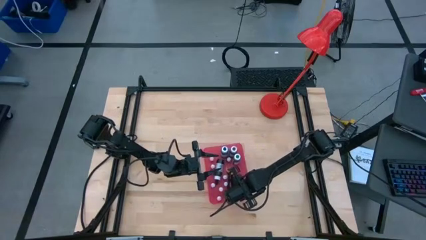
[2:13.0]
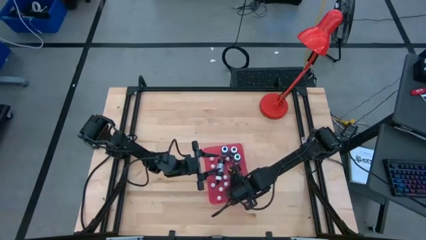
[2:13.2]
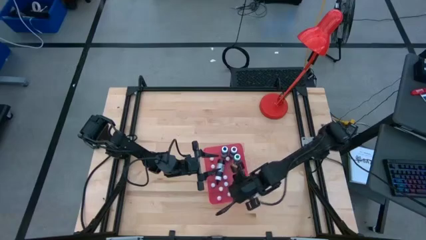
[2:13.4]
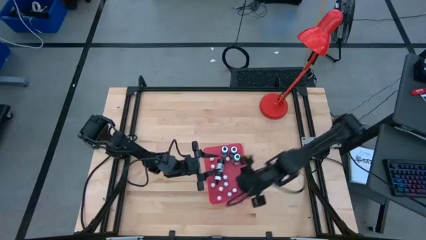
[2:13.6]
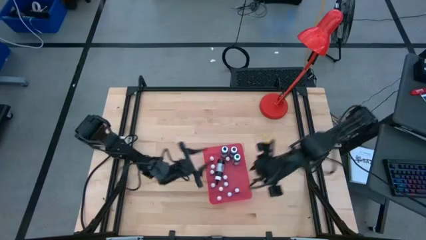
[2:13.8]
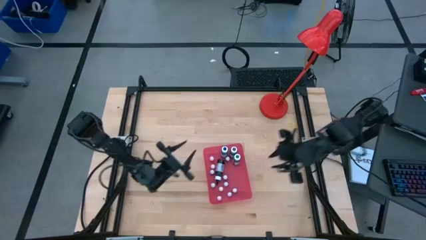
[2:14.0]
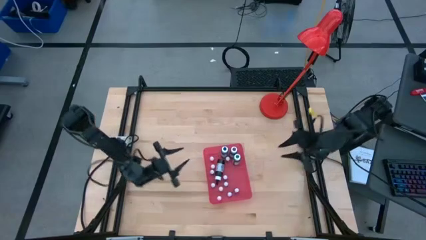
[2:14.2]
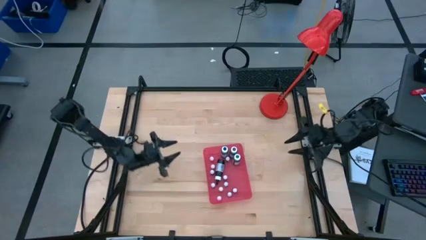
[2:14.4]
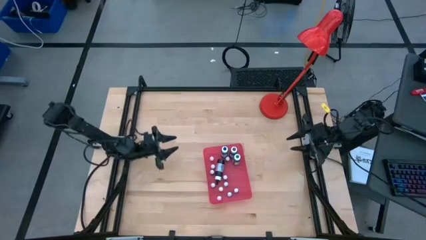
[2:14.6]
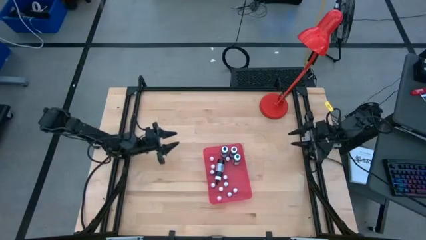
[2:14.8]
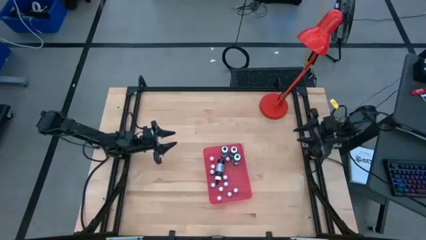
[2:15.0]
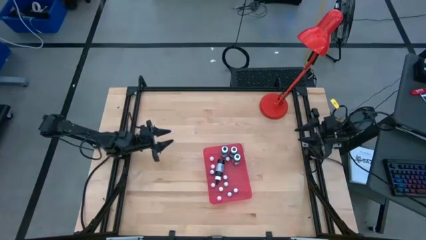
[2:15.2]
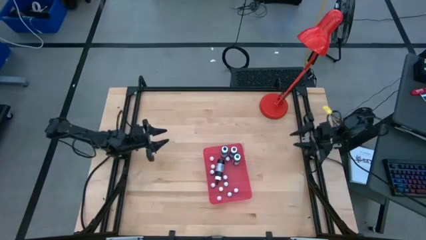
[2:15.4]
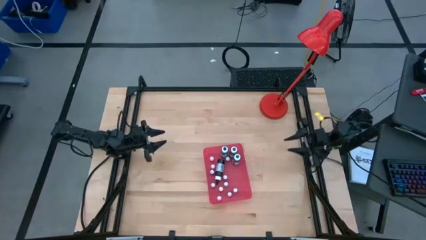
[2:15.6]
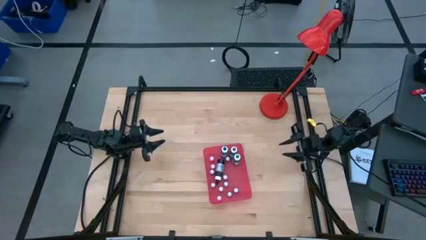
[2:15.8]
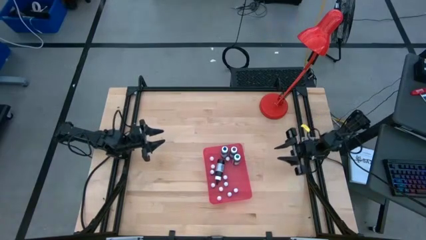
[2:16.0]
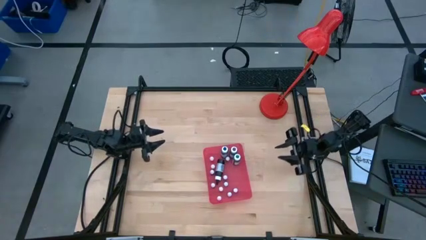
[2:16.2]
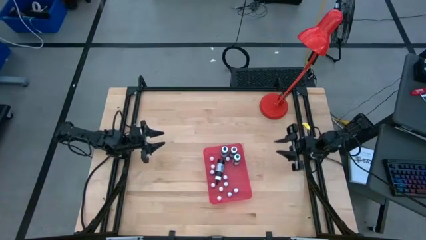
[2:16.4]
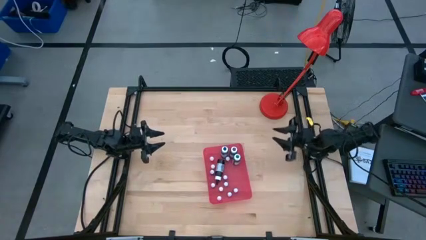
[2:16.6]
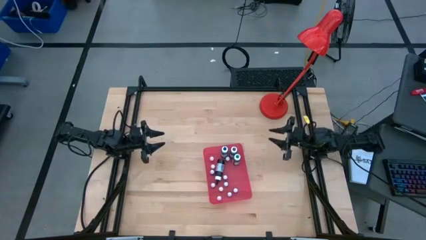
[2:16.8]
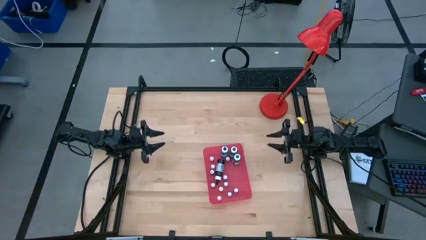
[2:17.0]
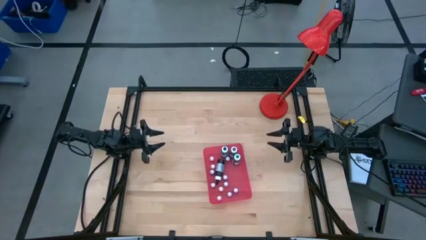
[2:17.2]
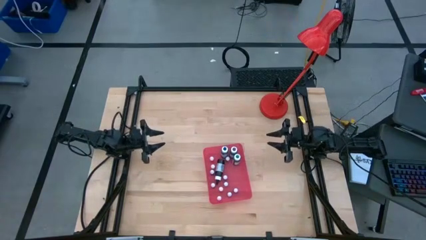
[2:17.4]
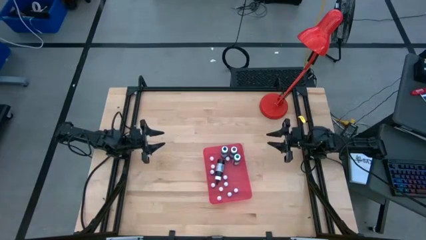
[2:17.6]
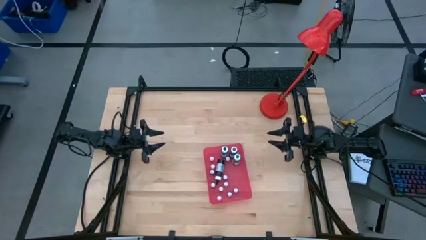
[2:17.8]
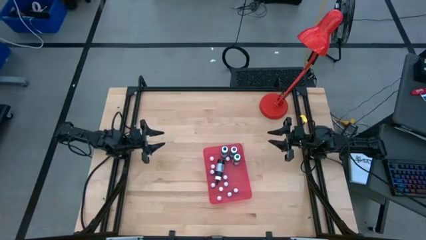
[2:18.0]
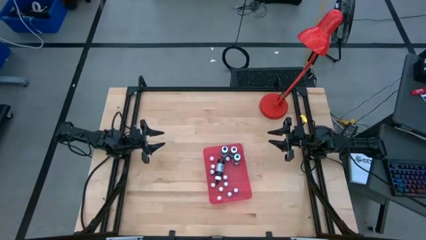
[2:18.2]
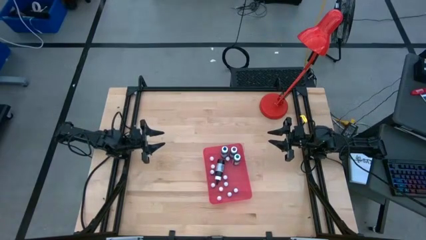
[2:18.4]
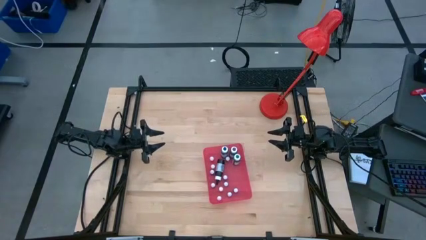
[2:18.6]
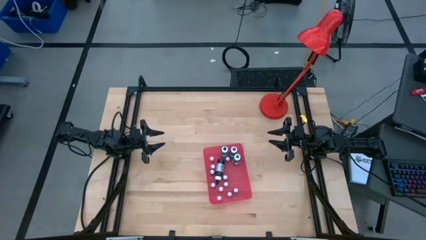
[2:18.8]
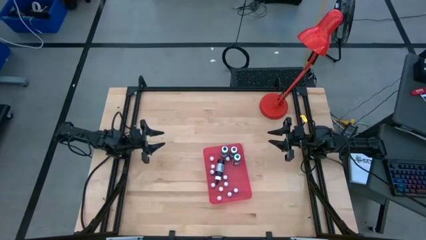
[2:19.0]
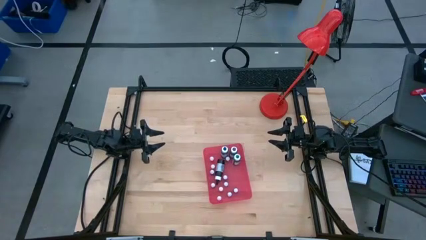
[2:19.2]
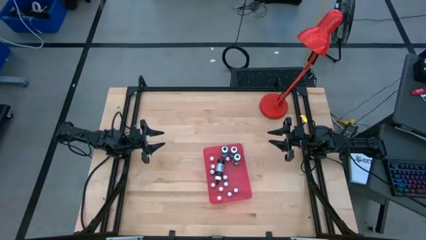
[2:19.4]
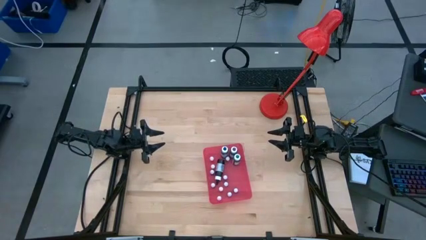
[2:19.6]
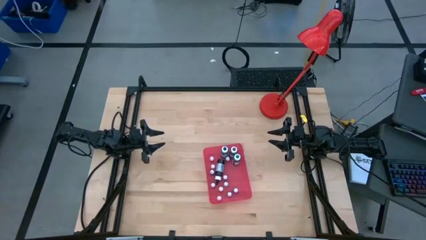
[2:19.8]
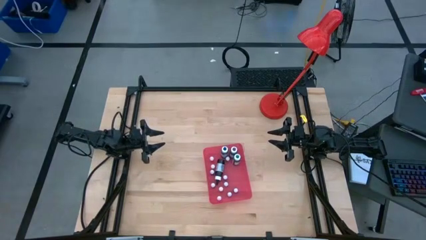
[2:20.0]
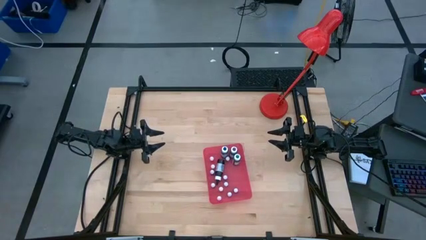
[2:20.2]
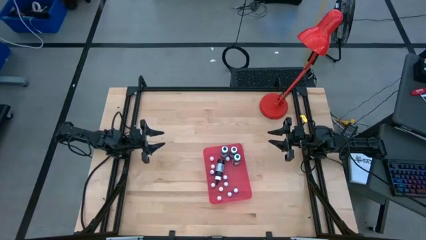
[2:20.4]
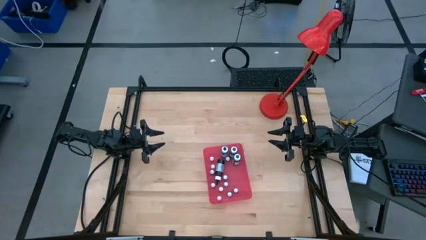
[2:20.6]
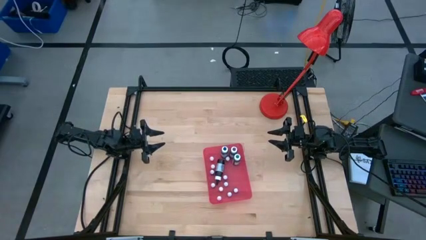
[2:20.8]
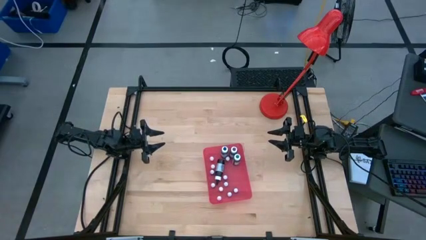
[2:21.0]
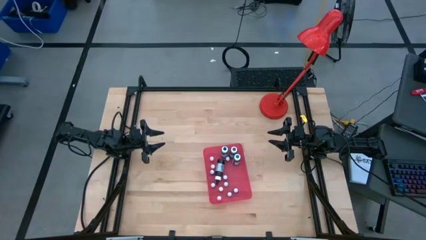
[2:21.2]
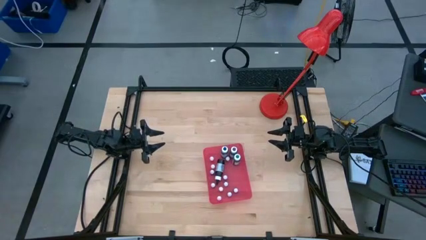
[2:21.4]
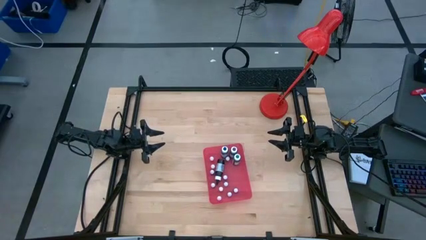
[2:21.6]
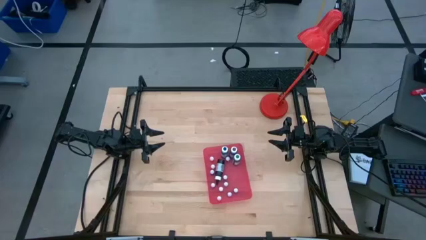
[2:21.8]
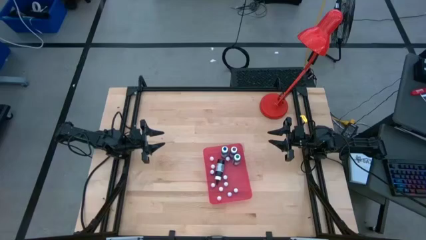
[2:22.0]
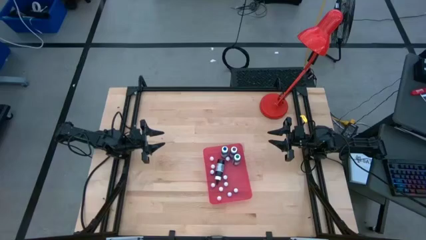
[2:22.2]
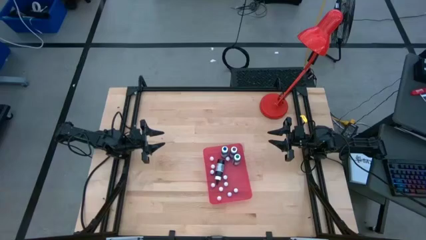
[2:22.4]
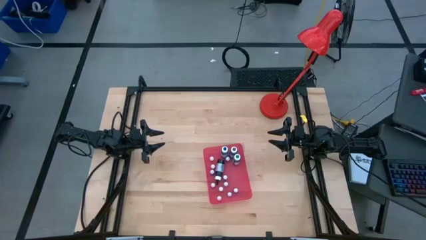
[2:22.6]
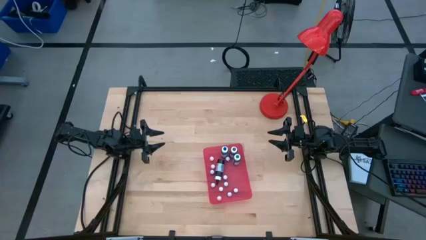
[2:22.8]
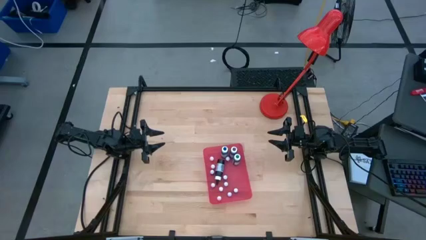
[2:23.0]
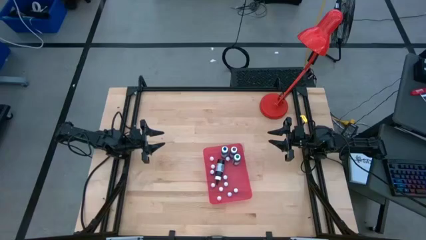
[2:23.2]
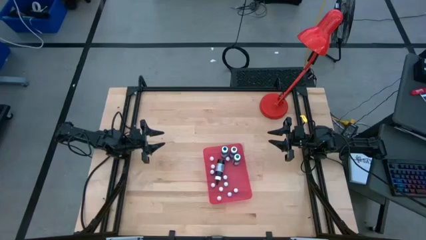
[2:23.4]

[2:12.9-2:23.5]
Task: Pick & Place food coloring
Return to Home Position
